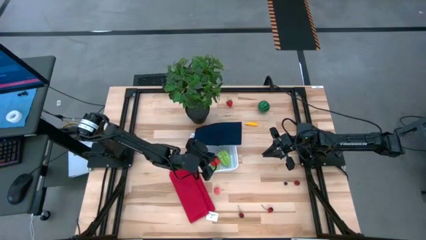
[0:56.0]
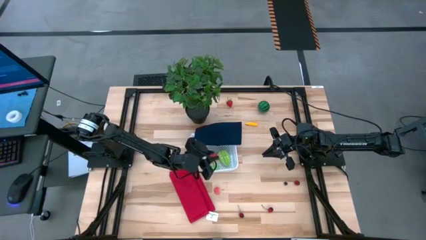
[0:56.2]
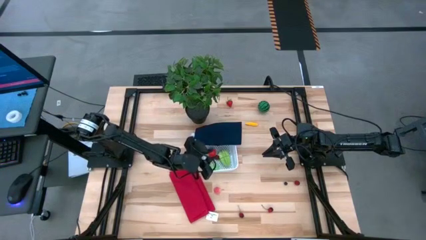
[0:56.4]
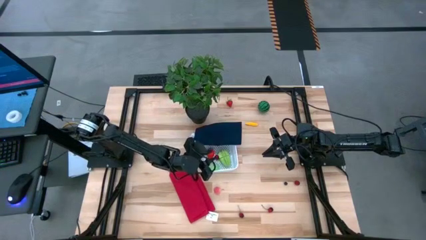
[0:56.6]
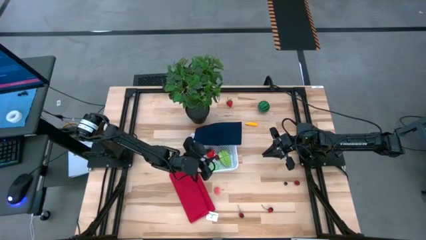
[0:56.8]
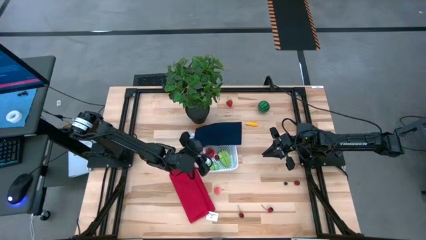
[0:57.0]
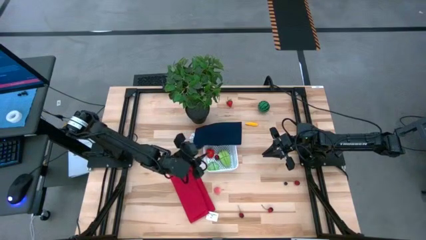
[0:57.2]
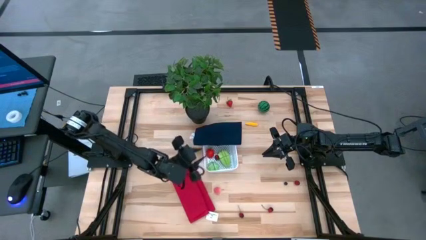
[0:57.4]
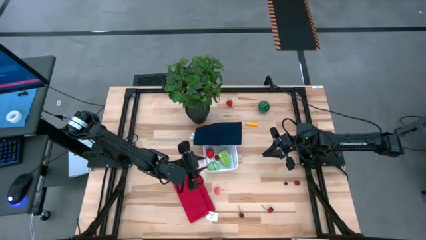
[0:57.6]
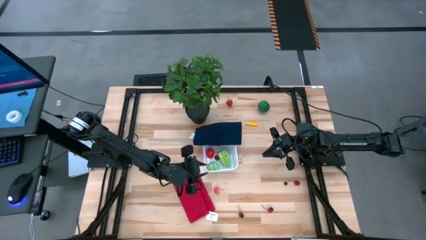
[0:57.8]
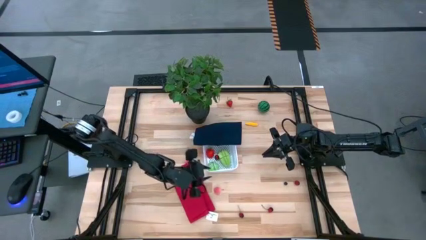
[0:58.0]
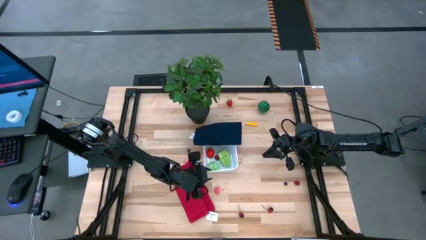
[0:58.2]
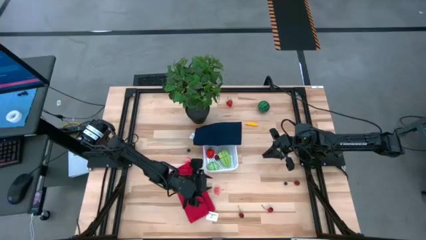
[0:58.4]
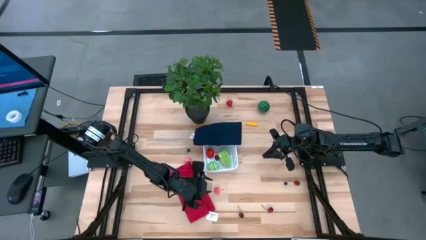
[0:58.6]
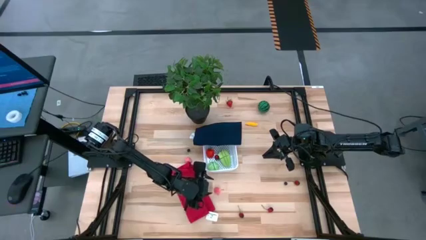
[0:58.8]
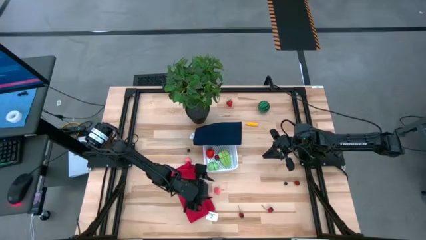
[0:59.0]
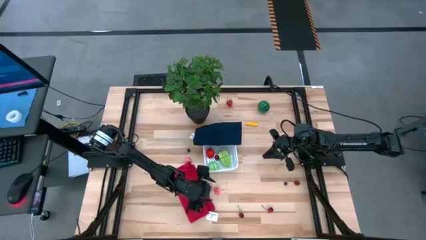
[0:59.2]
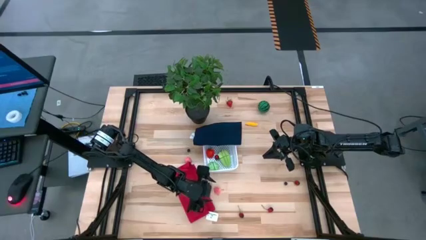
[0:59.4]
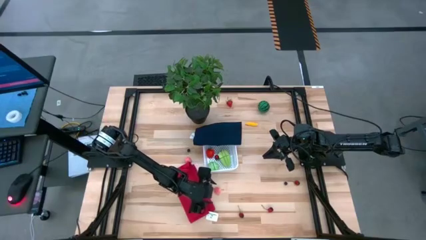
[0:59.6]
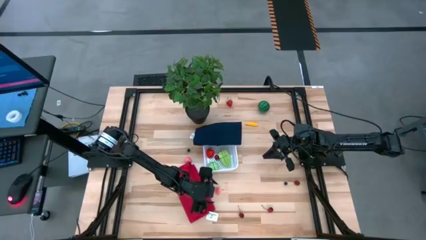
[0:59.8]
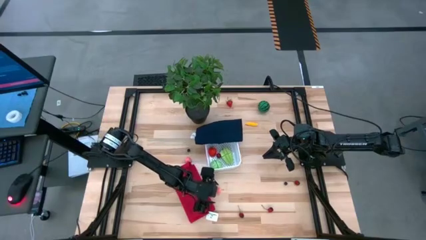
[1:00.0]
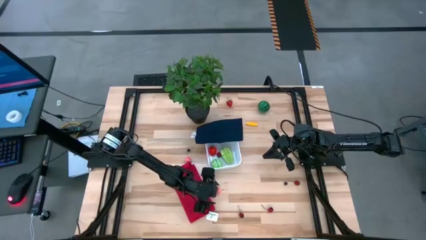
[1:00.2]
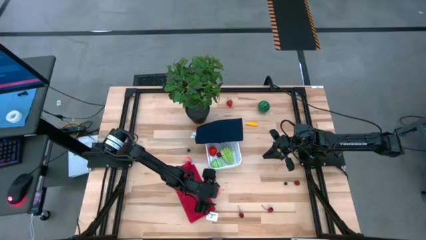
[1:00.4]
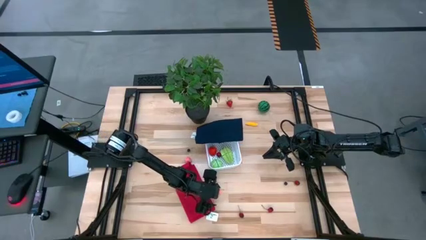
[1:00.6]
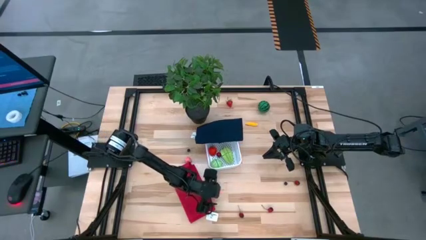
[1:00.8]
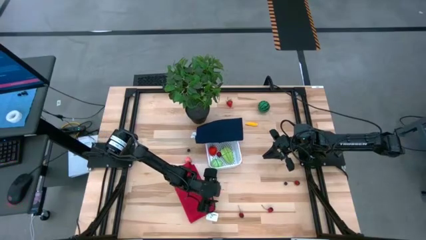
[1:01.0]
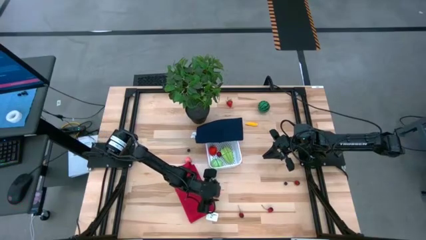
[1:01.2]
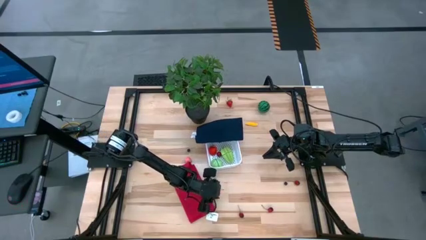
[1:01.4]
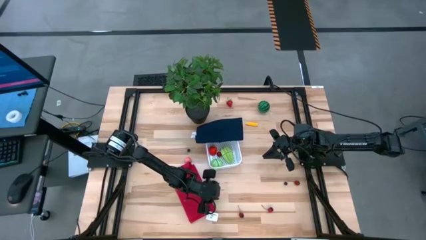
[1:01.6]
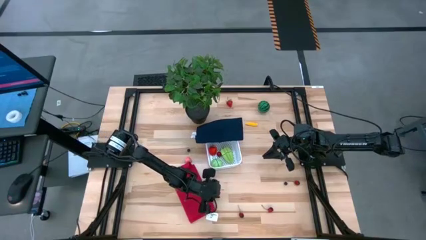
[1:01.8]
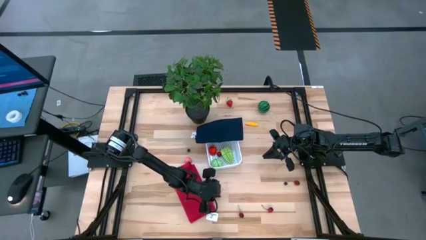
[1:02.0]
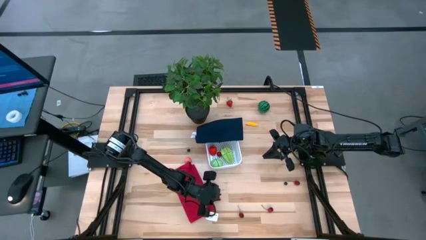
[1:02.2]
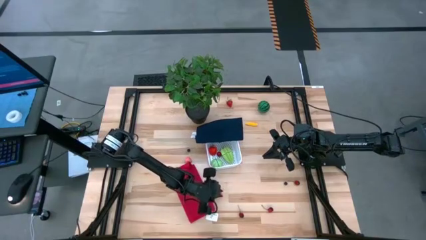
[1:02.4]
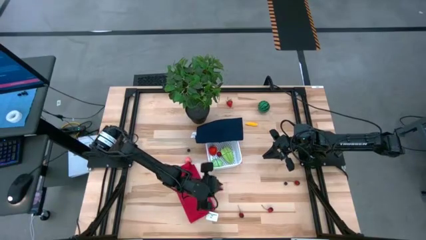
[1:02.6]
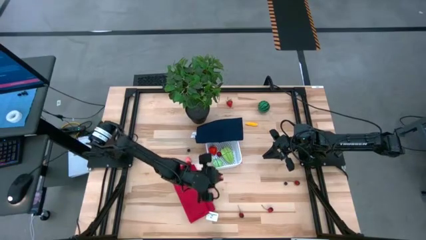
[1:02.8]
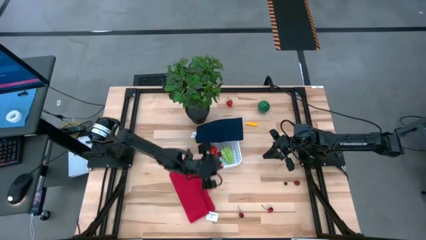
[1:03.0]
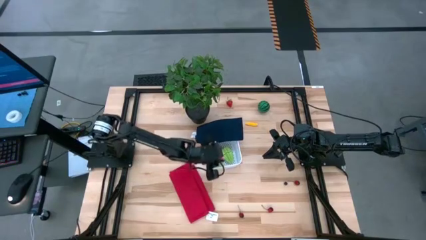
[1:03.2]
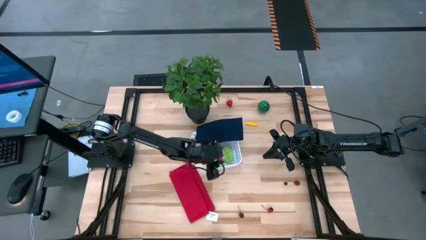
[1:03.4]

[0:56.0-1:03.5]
Task: Pick and placing Produce into tupperware
Put the peach into the bin

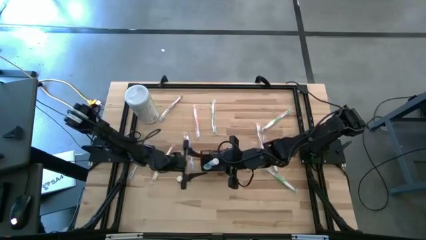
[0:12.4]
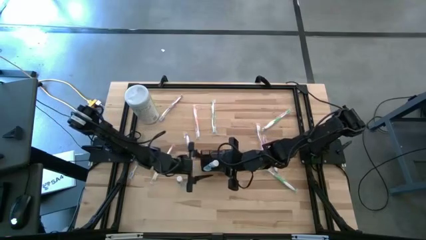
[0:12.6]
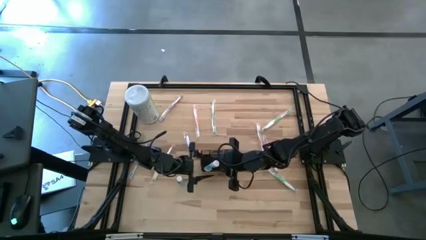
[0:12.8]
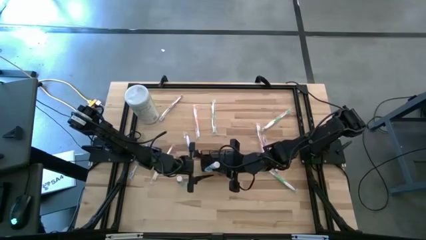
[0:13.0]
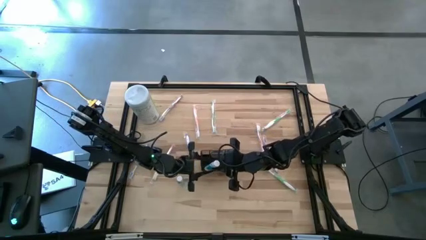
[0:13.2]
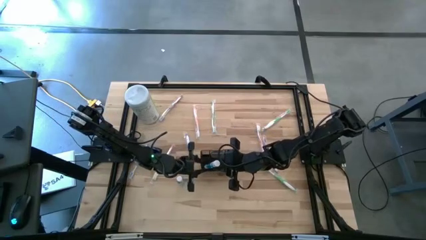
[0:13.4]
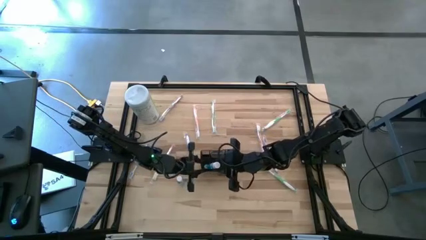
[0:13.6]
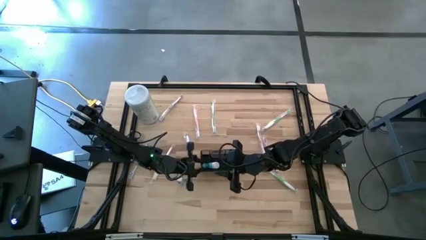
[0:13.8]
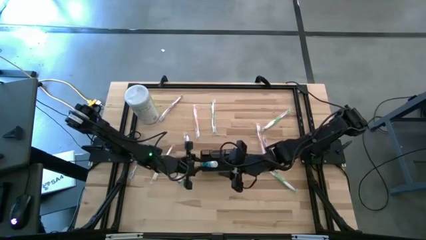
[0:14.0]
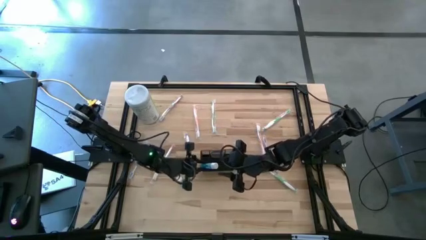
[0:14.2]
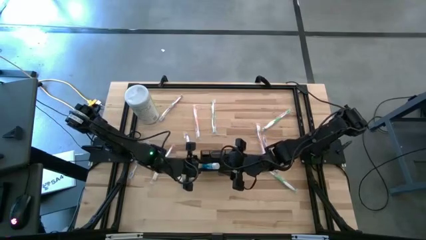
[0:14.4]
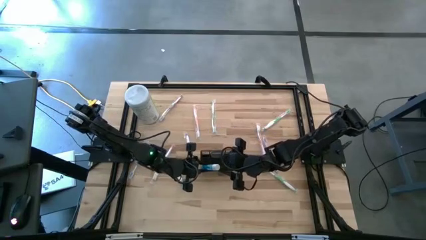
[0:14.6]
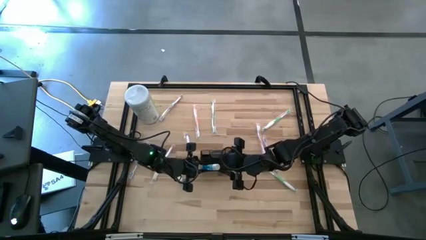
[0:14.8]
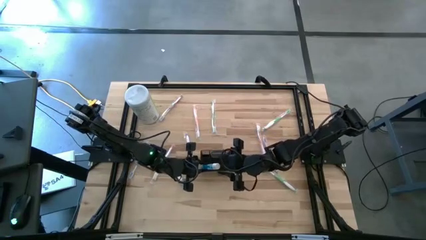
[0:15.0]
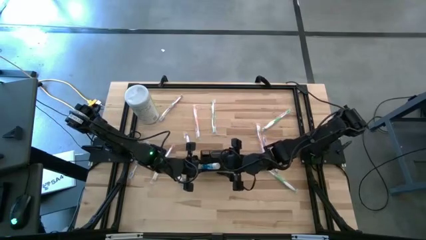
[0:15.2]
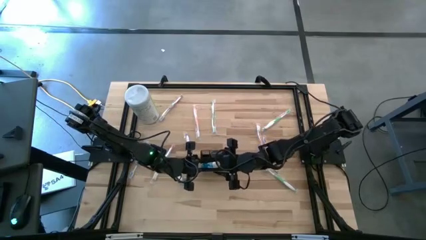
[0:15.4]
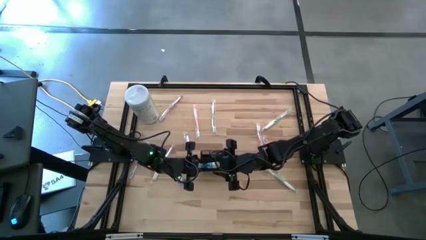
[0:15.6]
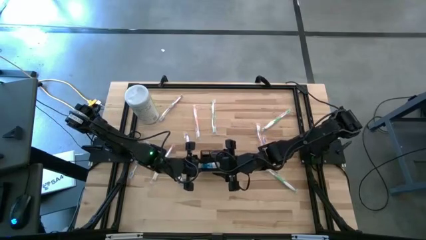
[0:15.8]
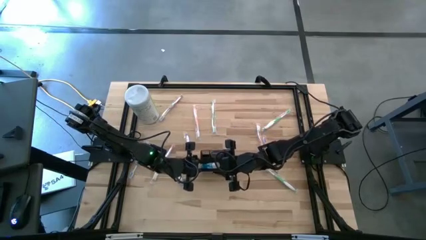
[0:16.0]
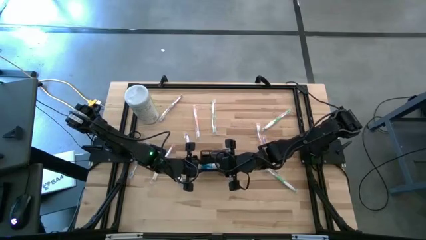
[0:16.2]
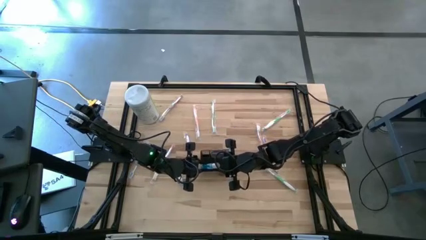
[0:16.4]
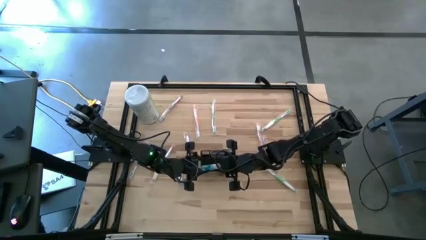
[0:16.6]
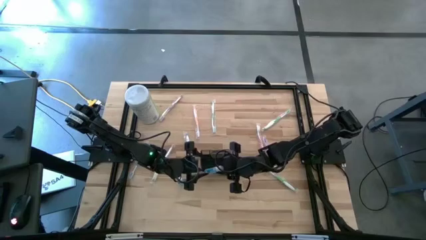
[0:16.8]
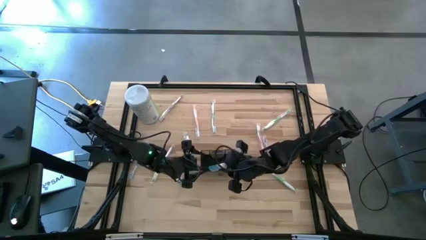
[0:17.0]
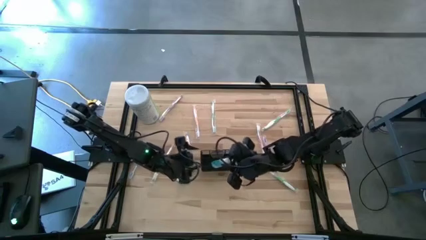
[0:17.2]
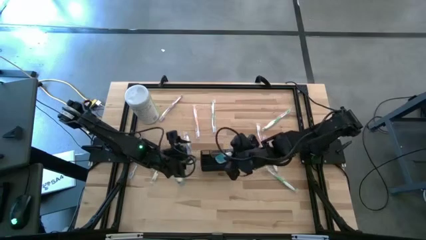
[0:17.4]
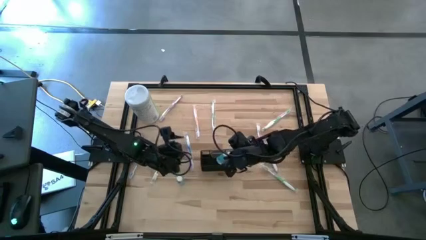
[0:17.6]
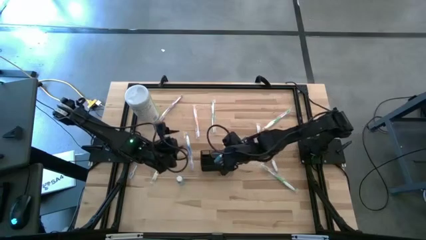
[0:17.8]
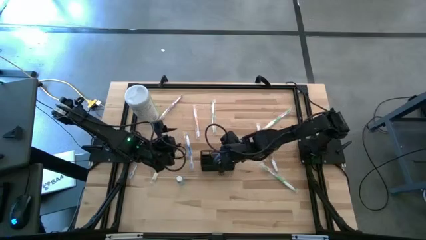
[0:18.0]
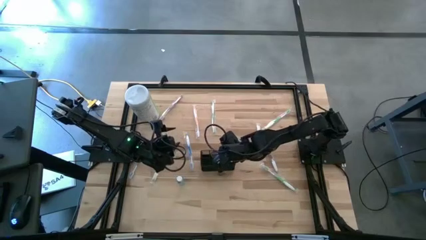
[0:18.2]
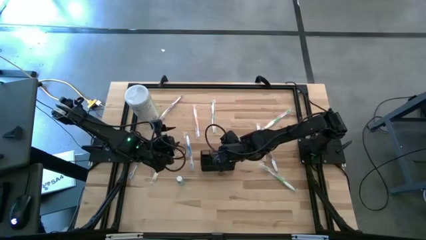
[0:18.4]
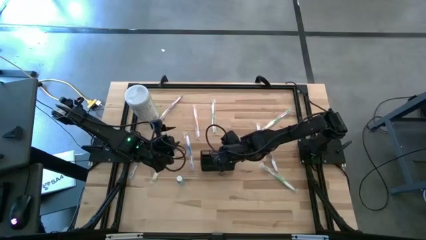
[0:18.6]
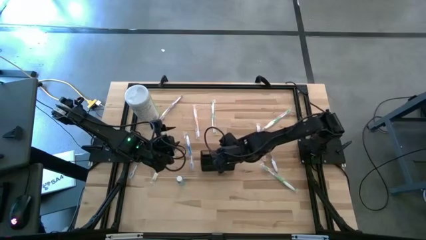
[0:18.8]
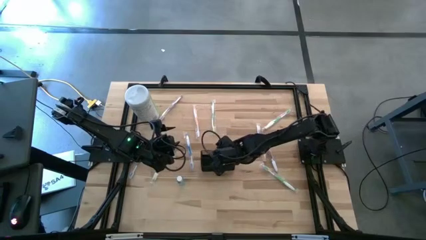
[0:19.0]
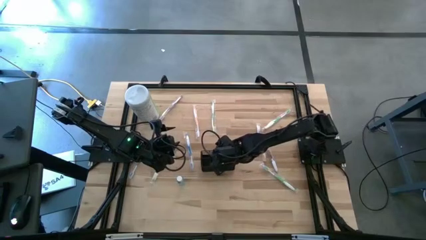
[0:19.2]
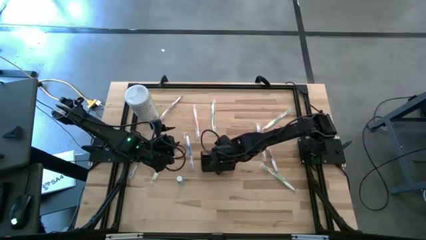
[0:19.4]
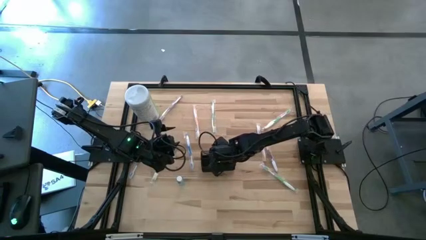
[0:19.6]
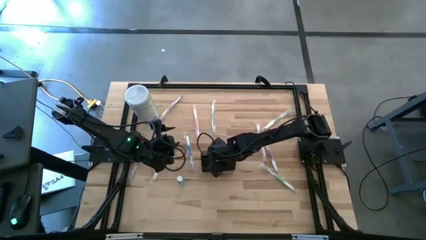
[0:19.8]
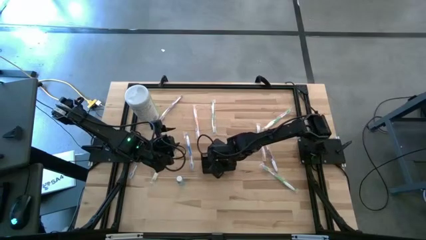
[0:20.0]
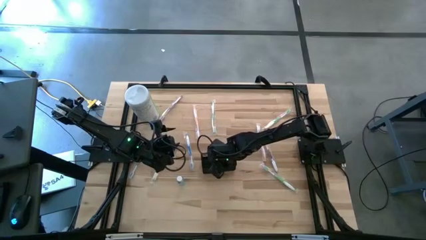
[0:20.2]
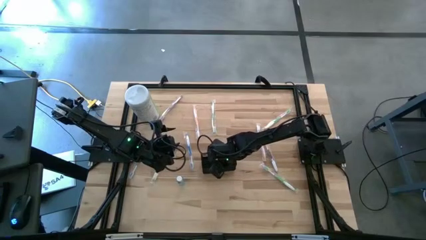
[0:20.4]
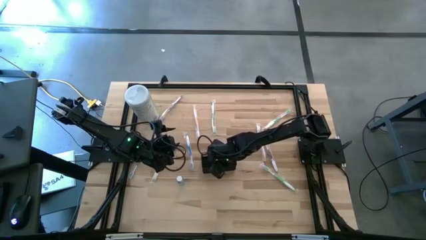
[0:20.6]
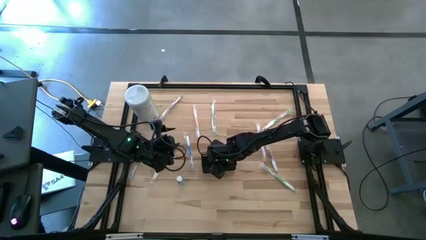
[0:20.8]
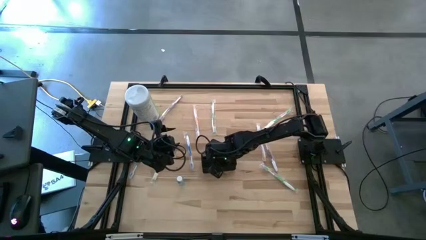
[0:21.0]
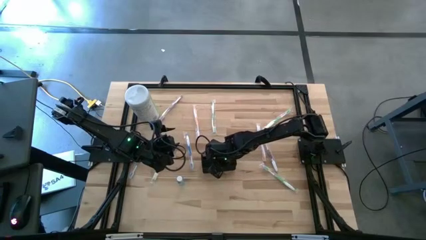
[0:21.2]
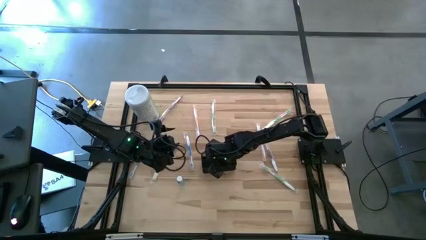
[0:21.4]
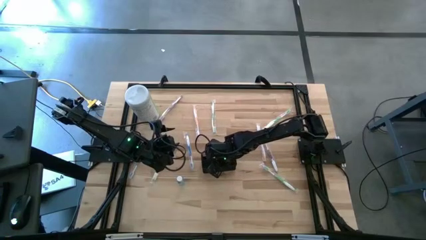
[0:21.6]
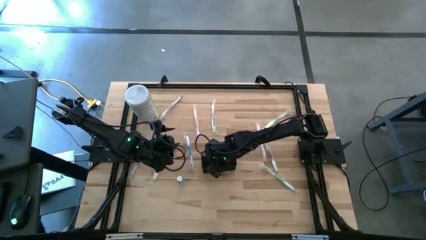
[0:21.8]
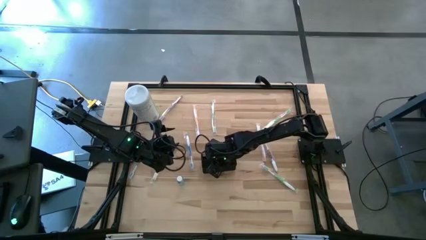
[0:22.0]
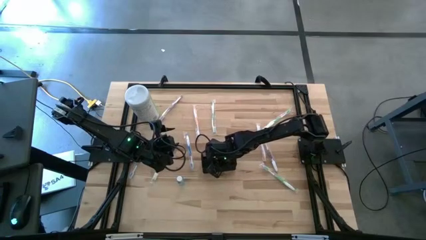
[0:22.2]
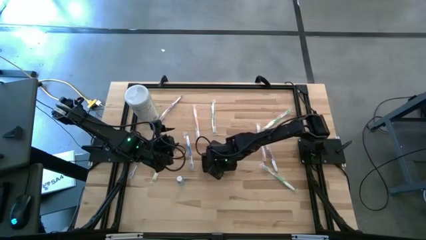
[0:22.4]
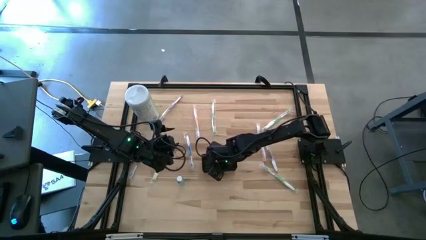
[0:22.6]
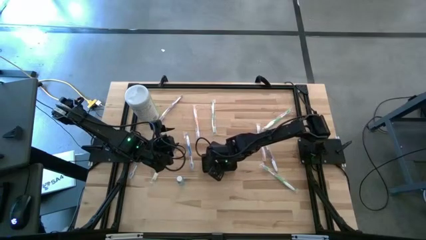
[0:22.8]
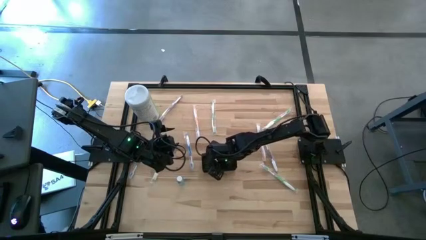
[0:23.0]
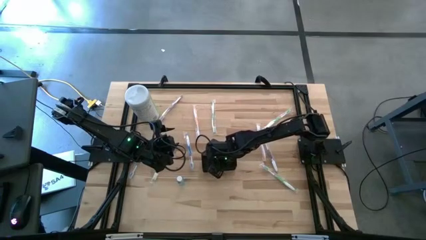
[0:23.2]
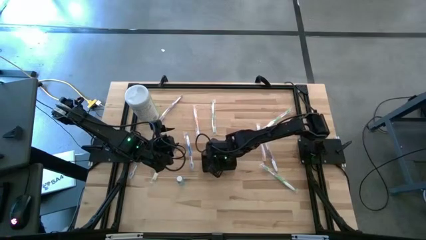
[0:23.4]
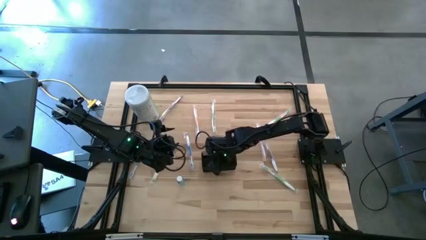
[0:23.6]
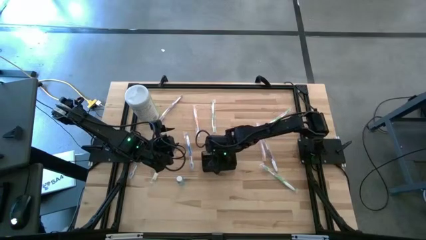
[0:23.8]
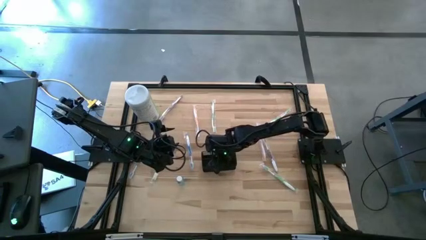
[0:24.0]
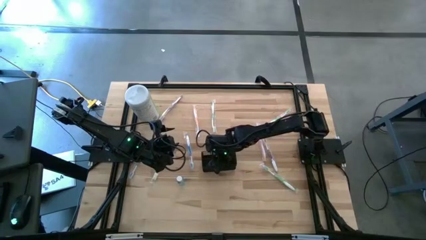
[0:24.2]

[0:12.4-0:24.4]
Task: Pick & Place toothbrushing station
Put the right blue mouthwash into the black wire organizer
